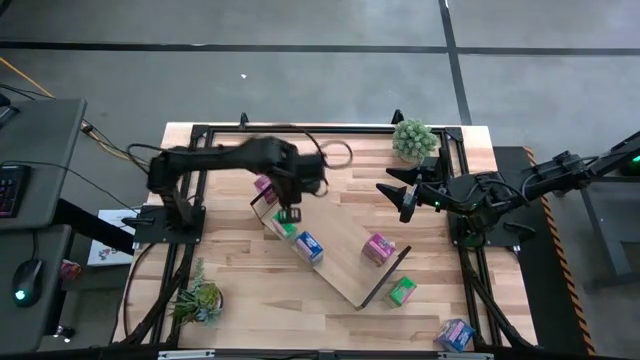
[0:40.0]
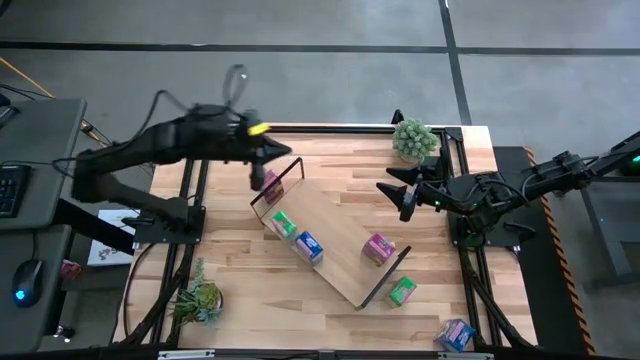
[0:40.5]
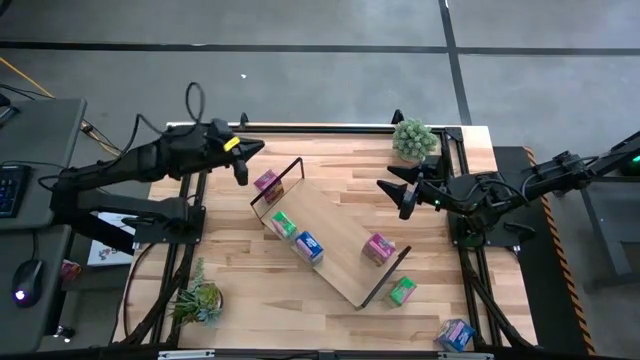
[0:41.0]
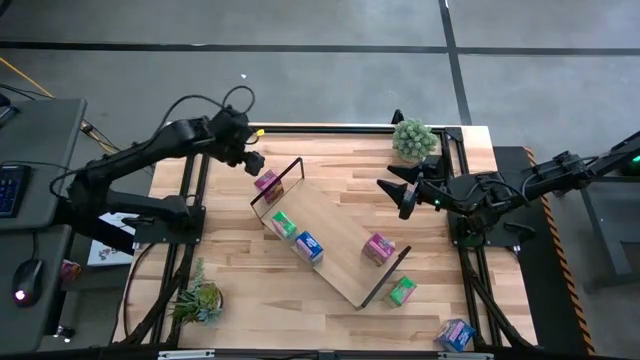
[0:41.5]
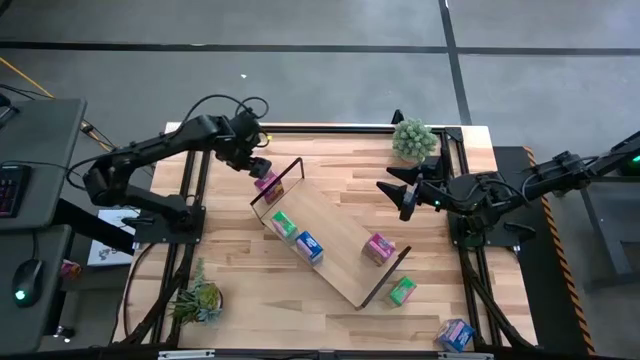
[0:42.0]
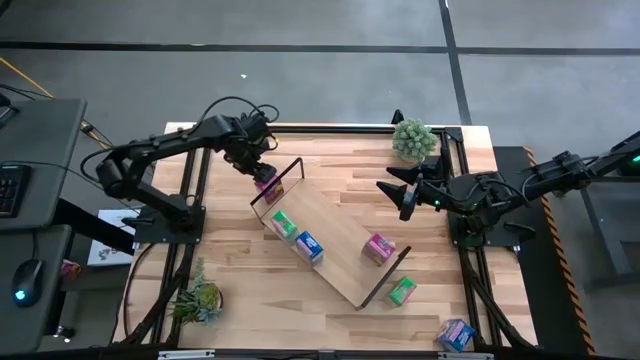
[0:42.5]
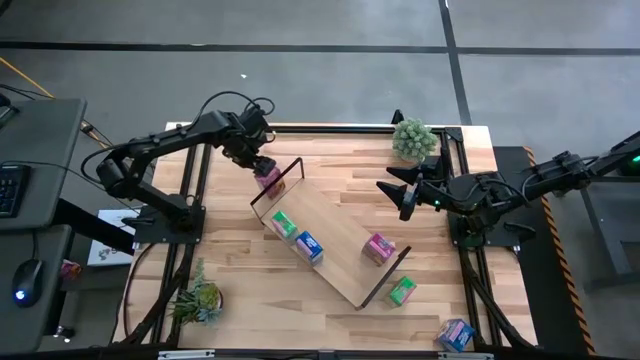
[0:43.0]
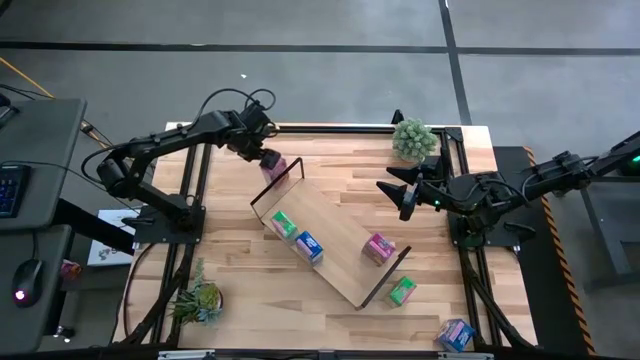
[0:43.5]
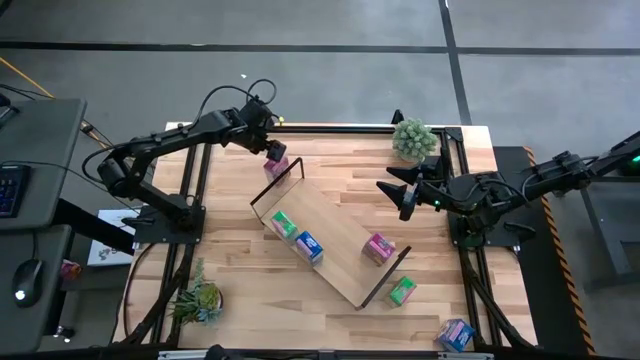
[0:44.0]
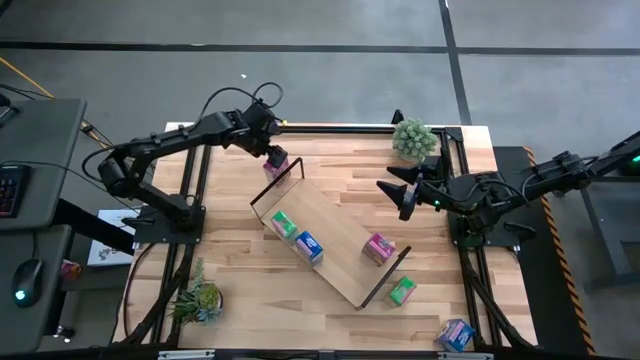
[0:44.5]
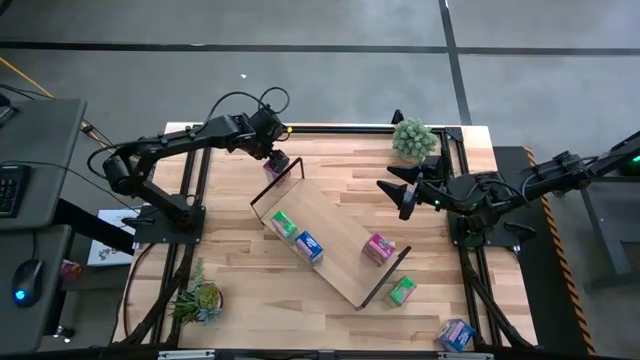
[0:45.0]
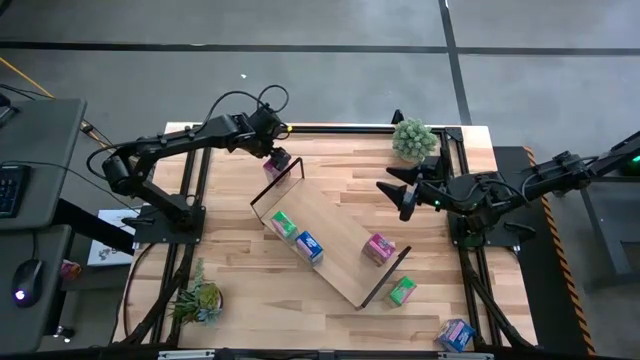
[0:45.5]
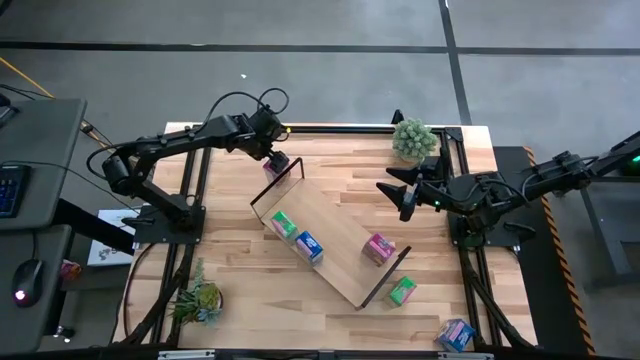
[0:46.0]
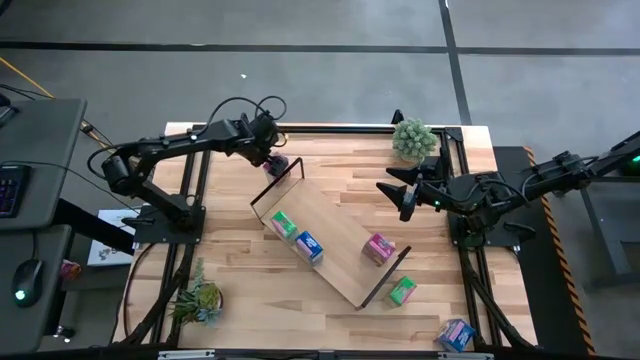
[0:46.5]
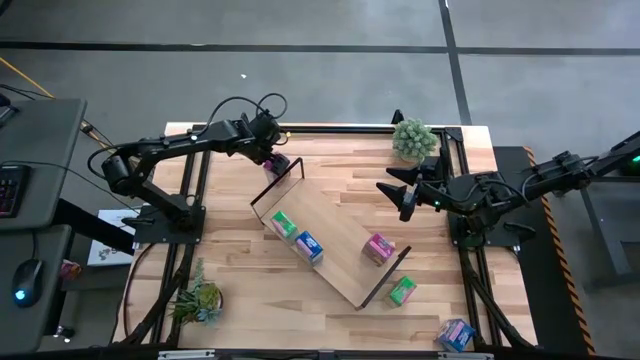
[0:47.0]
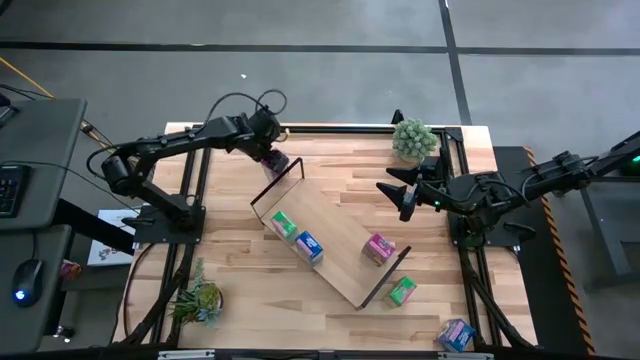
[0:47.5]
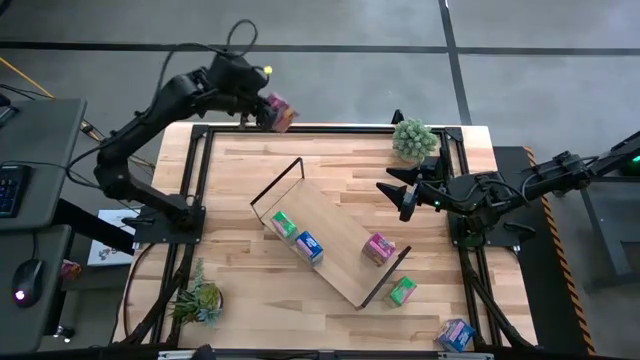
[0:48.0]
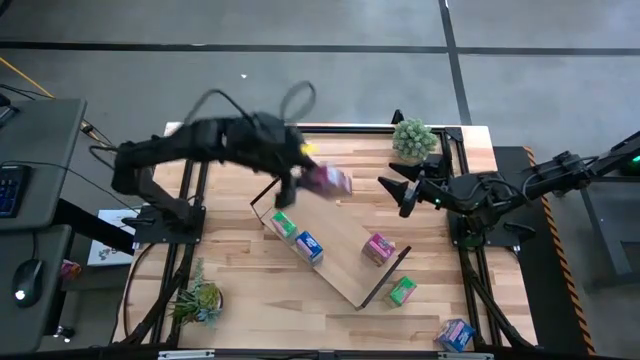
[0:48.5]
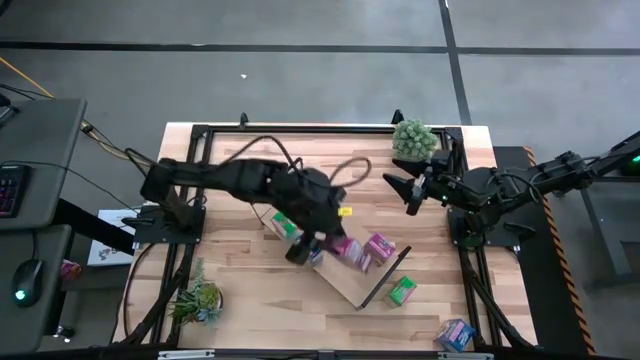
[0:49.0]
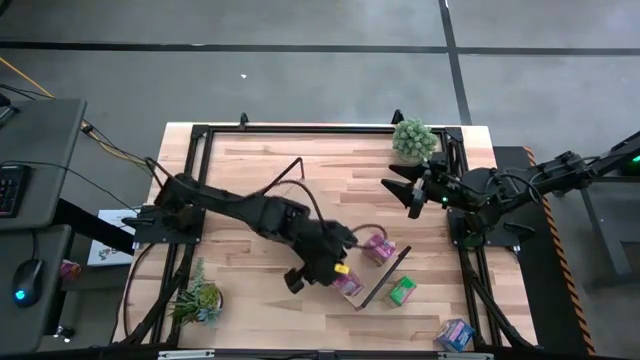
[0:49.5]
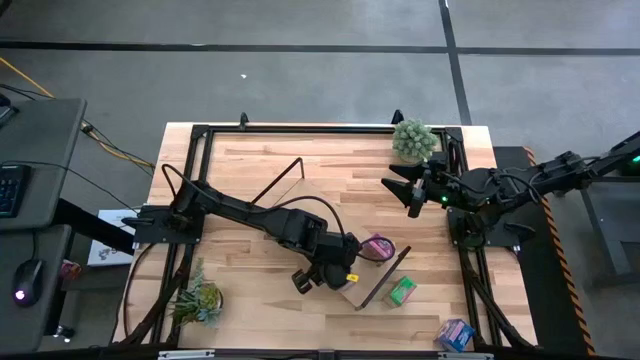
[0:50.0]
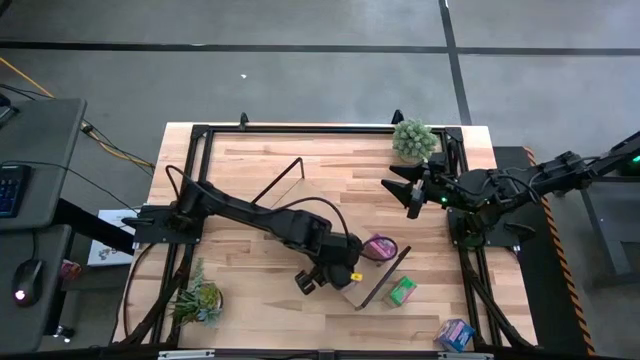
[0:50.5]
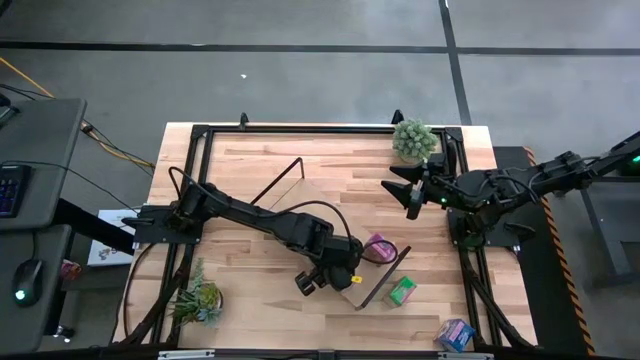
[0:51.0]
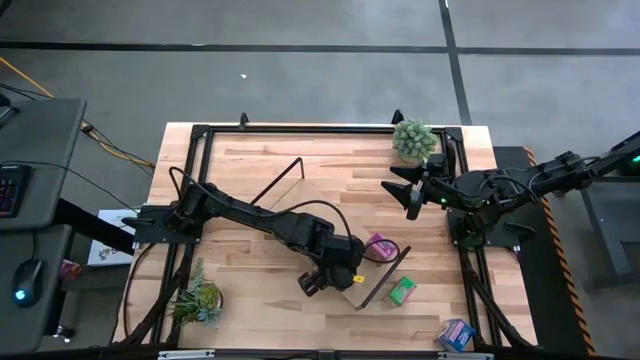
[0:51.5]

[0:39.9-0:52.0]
Task: Stack cereal on shelf
Put the violet cereal box on the shelf aligned with the other violet cereal box

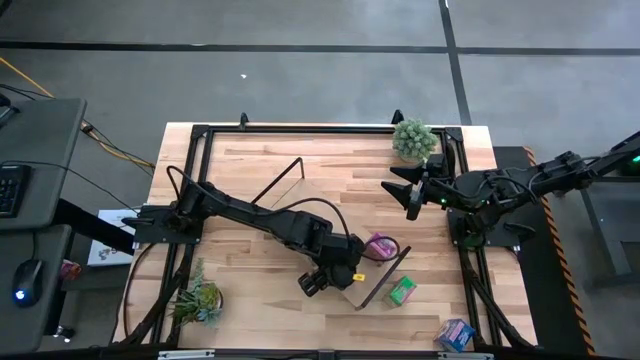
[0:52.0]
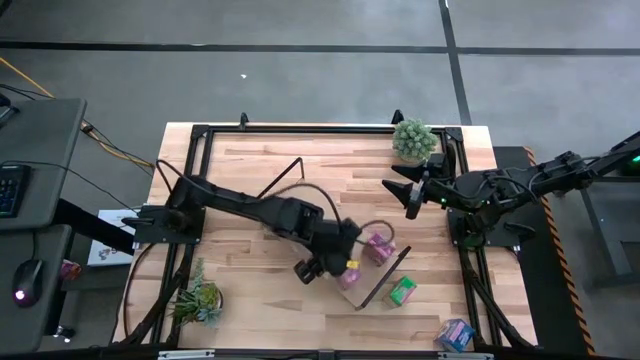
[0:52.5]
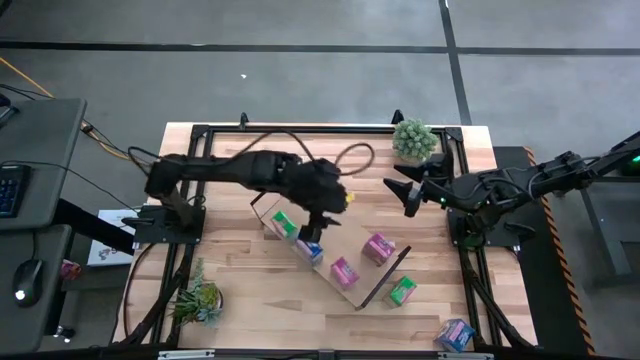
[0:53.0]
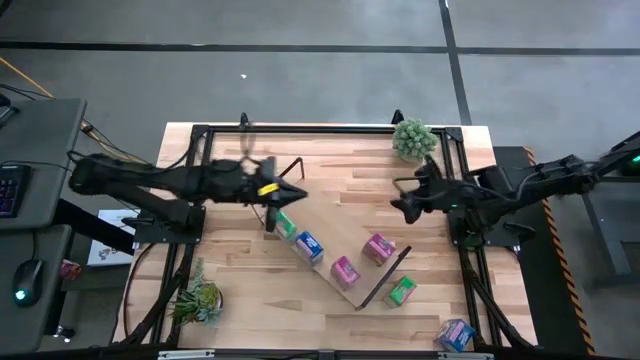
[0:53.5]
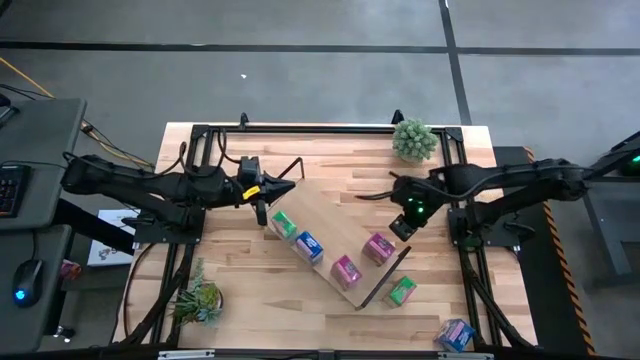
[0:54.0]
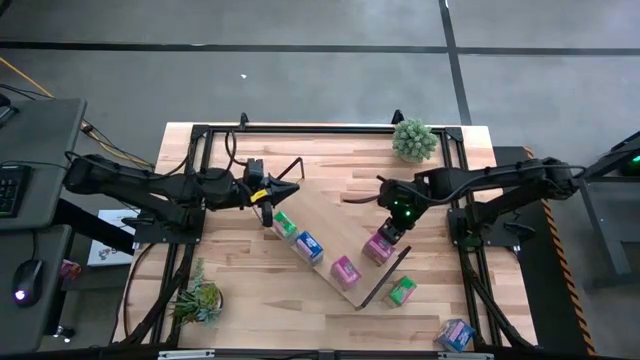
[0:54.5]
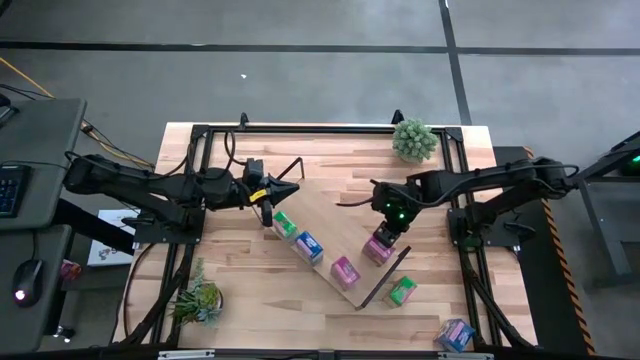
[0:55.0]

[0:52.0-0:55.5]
Adjust the violet cereal box in the back on the shelf

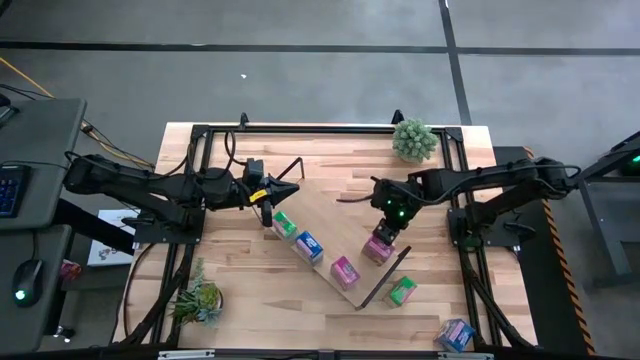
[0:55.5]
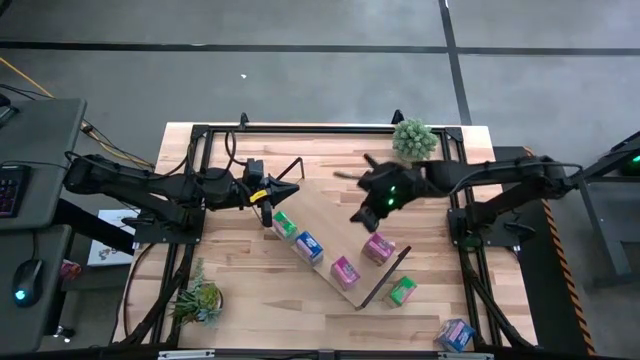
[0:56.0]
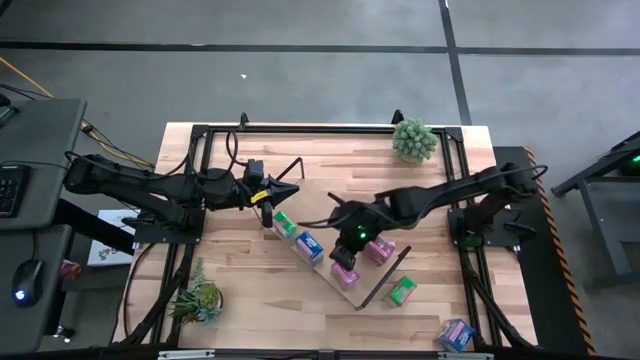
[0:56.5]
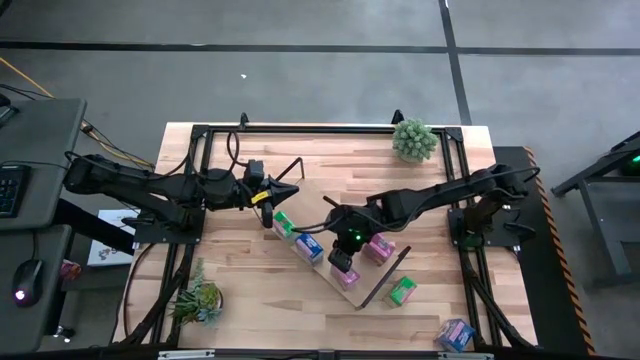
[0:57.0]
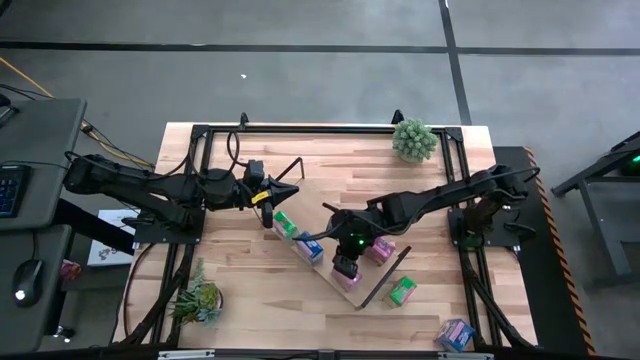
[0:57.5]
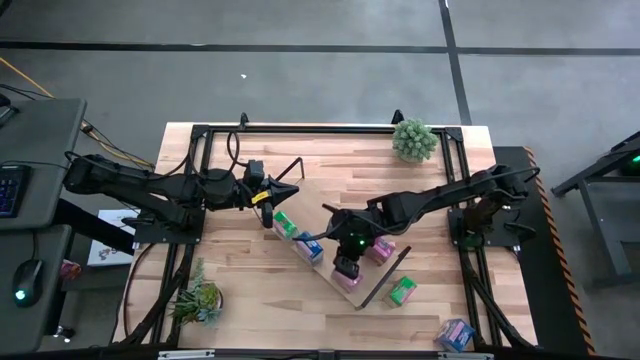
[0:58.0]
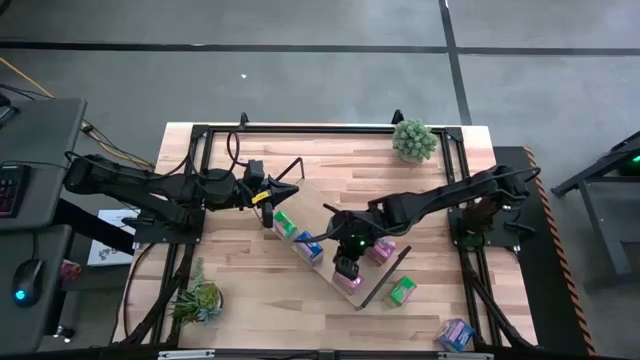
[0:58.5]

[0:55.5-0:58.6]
Adjust the violet cereal box in the front on the shelf

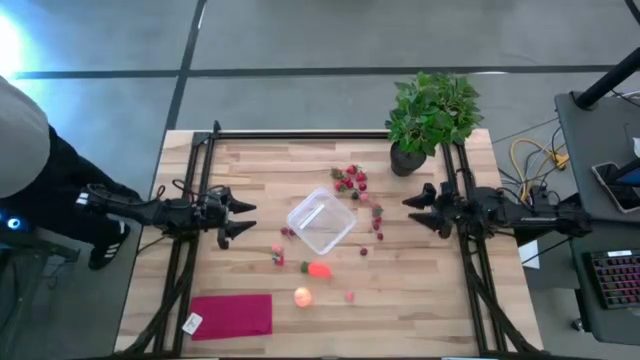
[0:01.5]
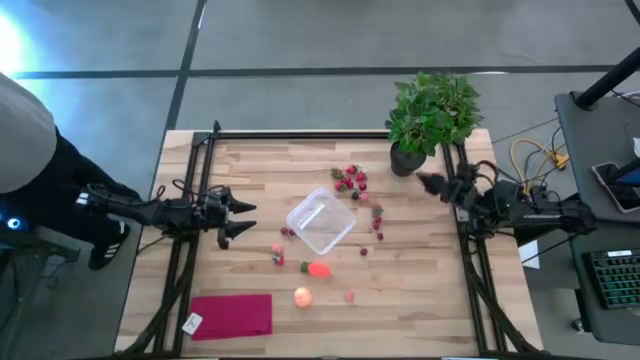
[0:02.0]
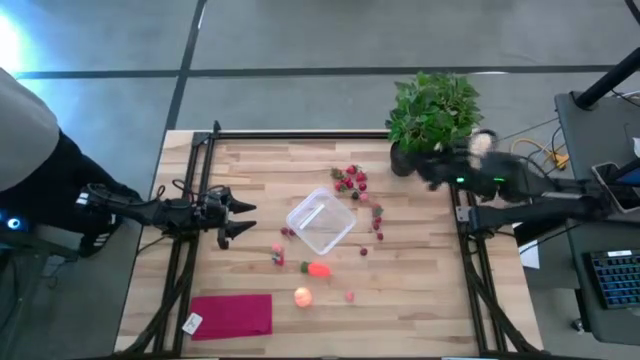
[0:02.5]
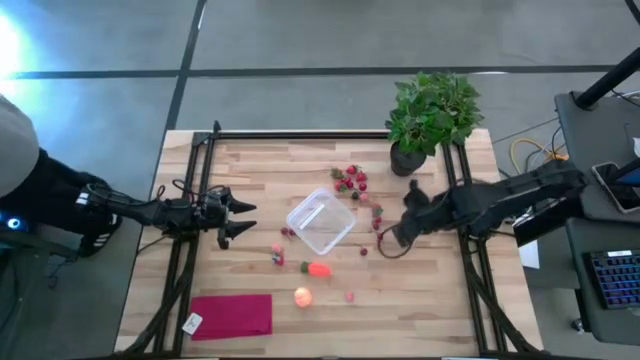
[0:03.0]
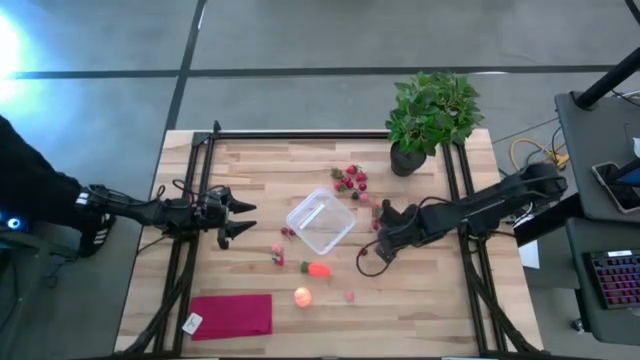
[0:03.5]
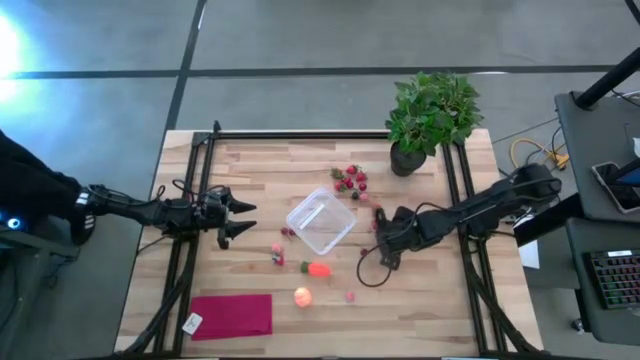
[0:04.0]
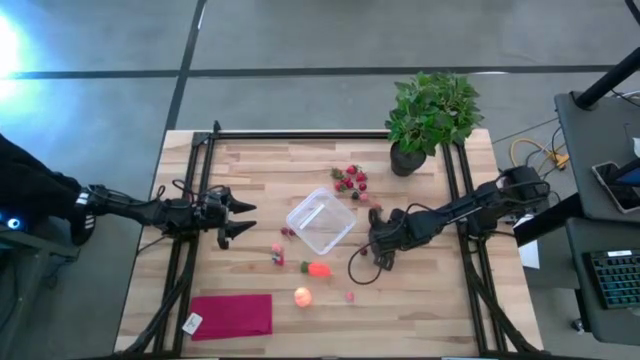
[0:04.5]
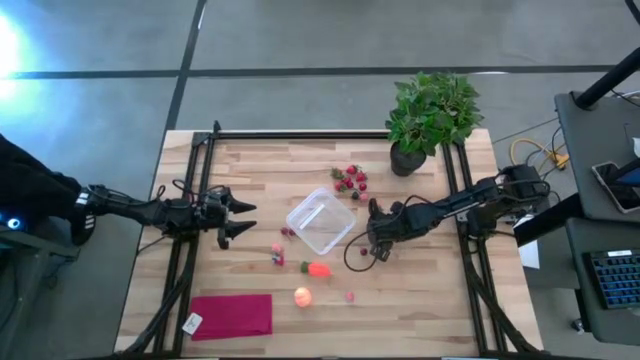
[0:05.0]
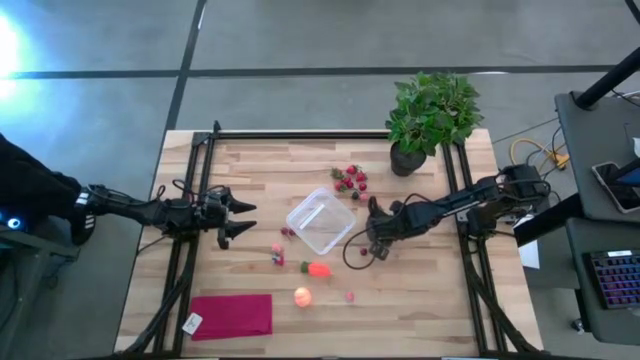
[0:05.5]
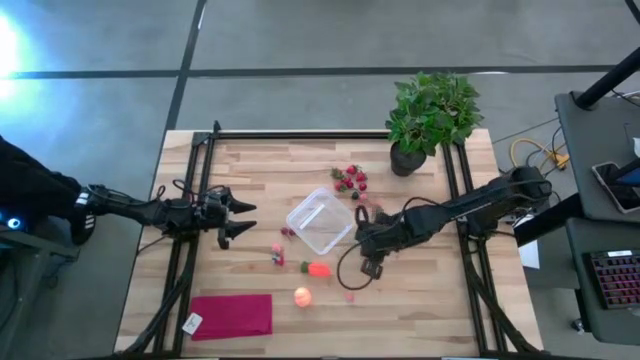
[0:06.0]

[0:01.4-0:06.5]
Task: Pick and placing Produce into tupperware
Put the red cherry into the transparent container
